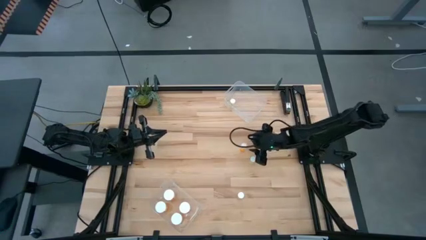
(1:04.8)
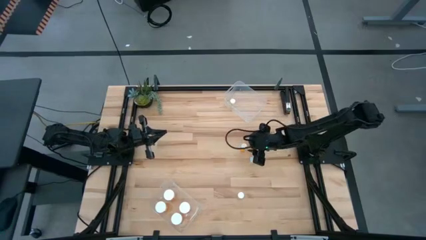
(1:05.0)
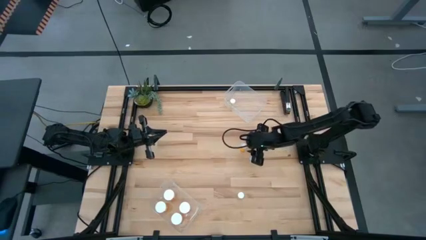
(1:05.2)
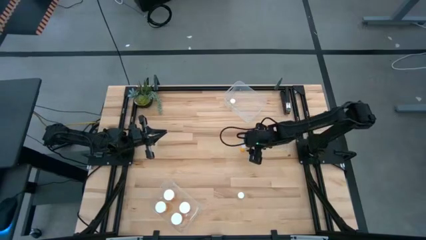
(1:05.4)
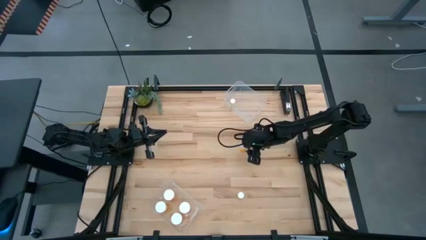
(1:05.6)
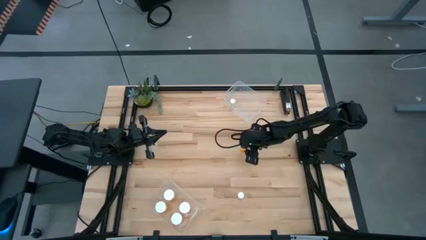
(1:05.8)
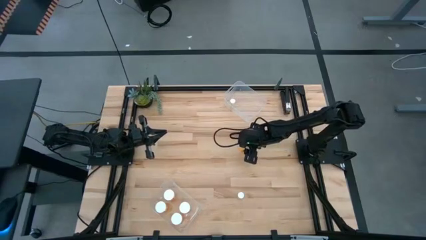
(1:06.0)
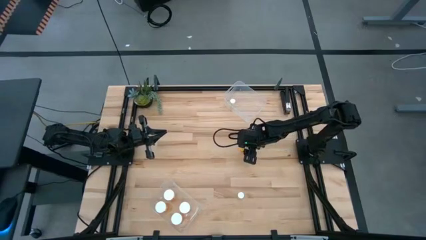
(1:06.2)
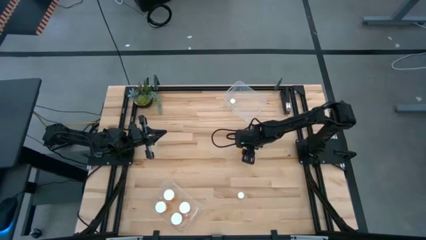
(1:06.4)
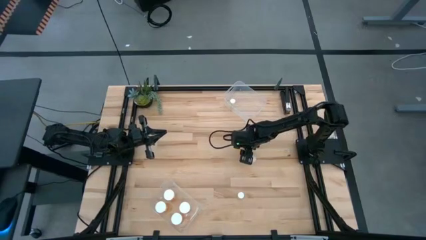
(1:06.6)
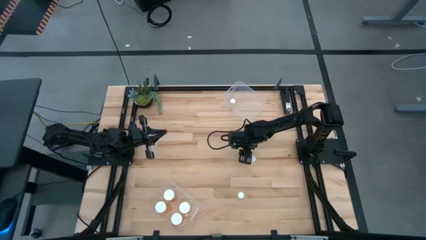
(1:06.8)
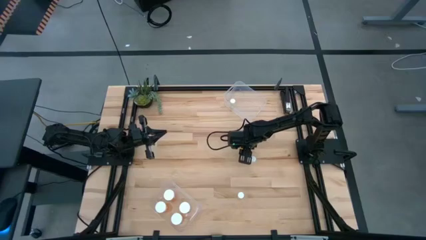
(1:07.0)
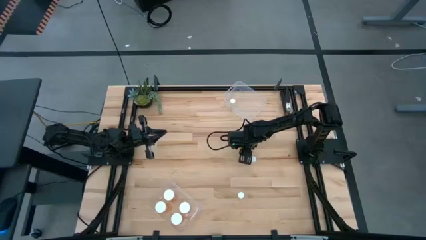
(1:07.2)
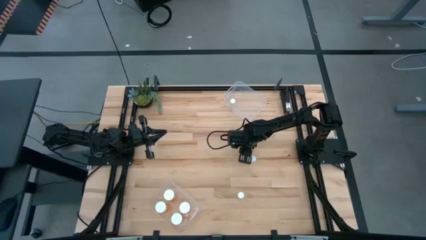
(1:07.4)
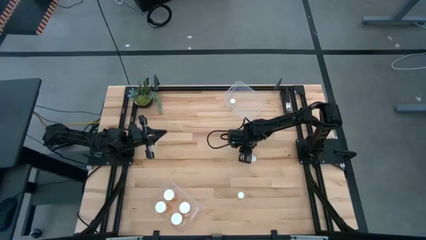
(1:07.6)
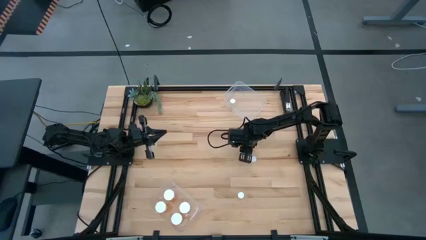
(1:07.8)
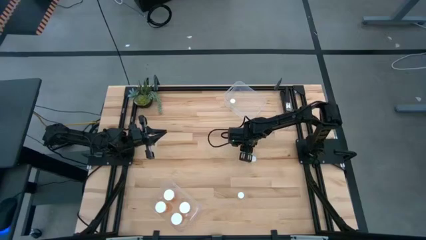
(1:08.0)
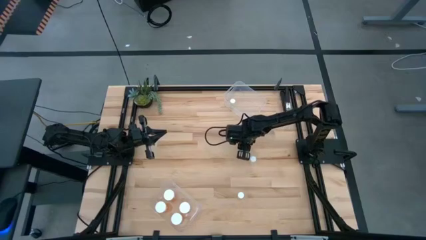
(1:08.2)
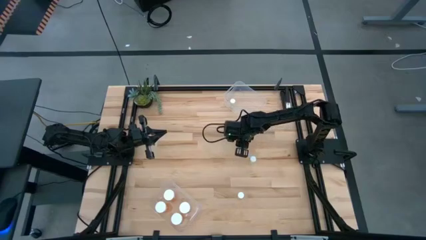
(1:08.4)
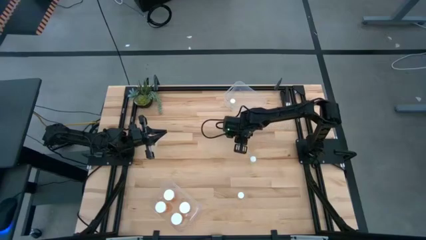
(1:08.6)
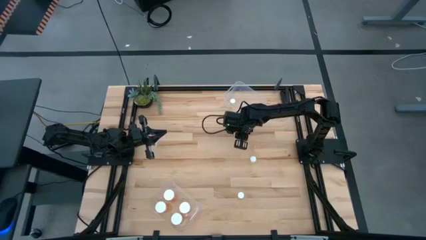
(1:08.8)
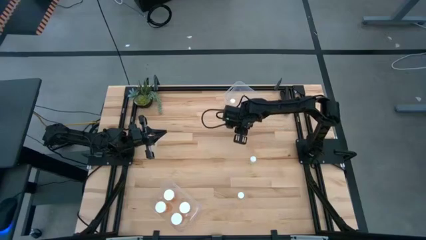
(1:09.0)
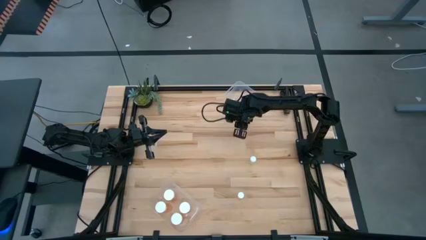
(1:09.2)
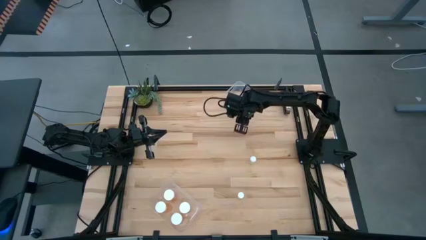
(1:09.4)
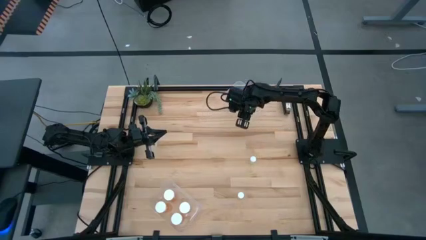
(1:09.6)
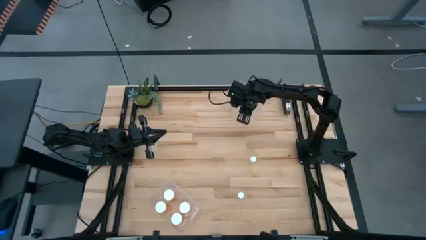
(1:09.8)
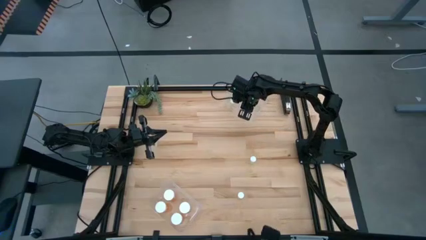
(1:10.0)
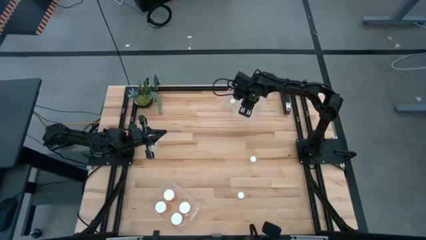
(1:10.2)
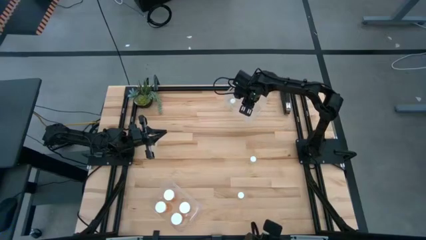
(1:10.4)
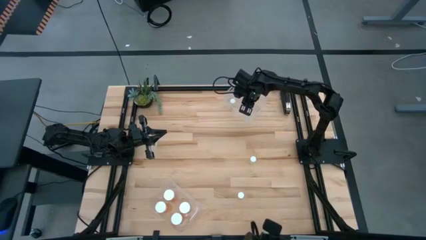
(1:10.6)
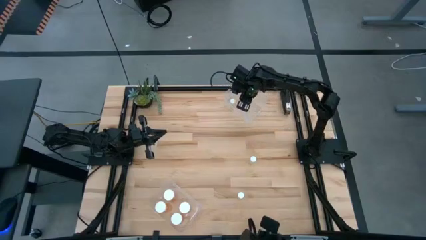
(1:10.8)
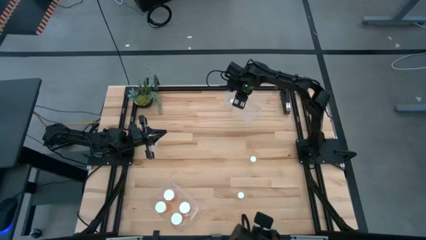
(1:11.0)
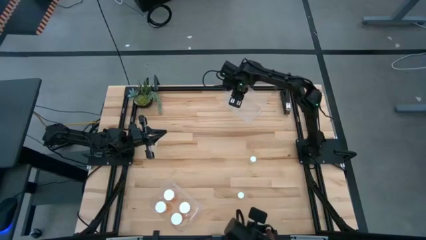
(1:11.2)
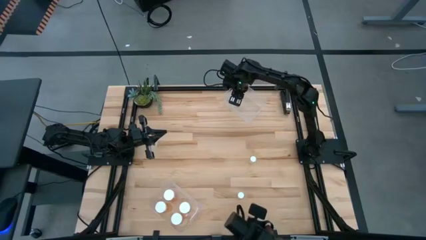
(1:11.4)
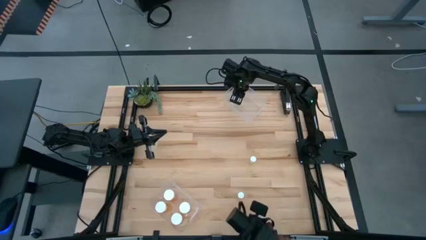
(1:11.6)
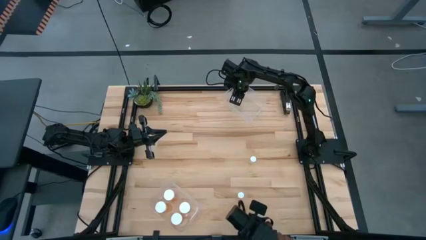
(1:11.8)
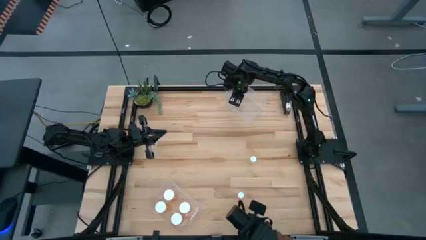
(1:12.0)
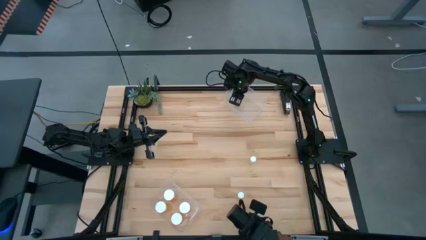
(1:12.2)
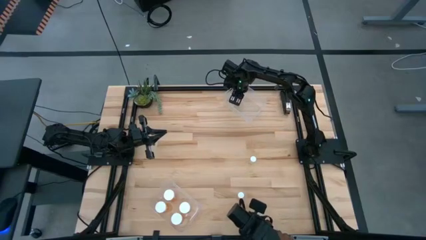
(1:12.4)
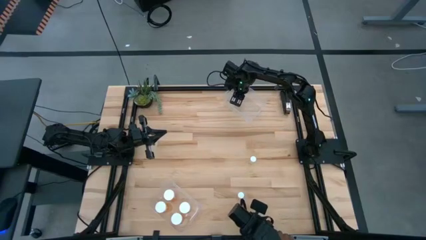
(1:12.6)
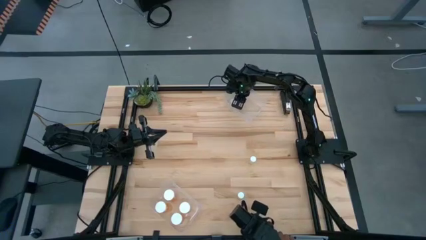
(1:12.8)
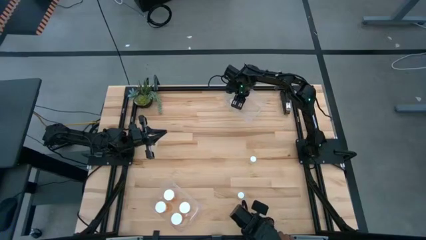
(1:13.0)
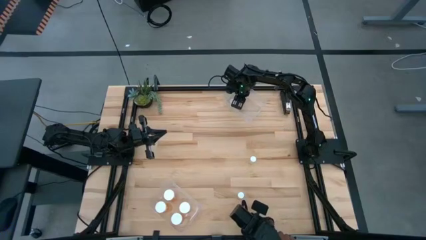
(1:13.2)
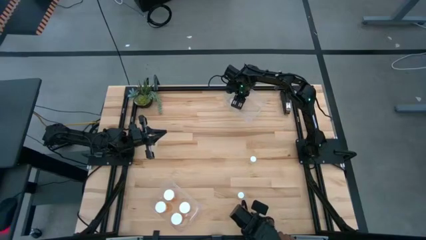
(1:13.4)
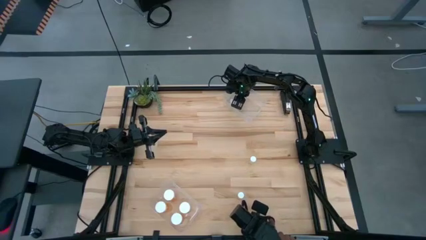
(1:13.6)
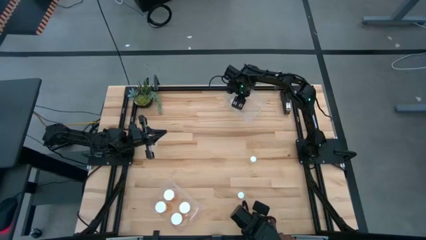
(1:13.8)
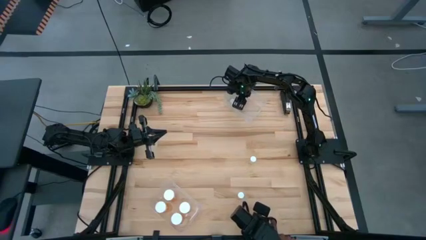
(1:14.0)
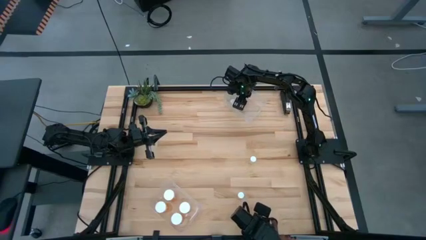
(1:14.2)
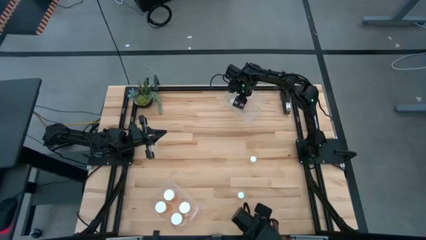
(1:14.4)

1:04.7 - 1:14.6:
Task: Pick and place medicine bottles into bin by pill shape (circle, oval)
Put the orange tablet bottle into the top transparent bin

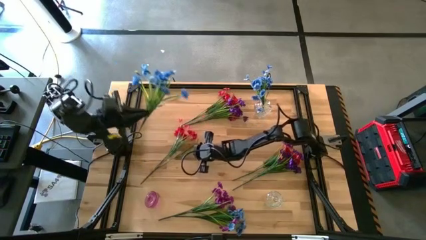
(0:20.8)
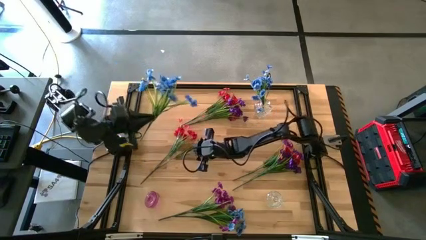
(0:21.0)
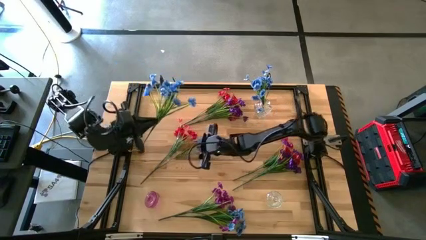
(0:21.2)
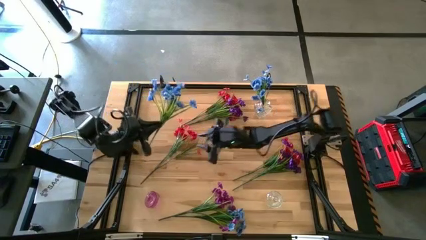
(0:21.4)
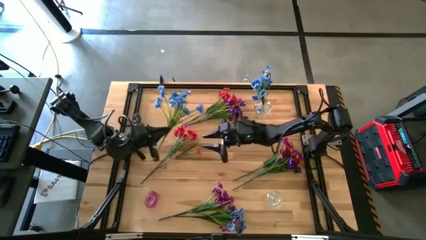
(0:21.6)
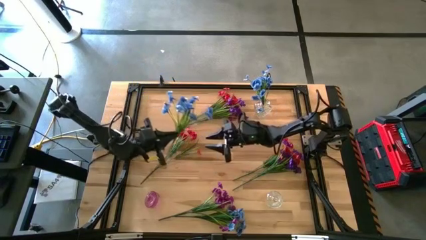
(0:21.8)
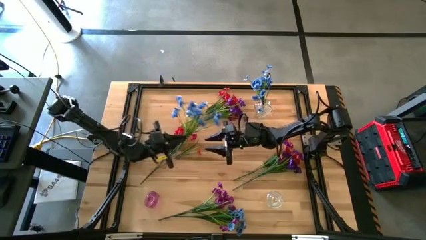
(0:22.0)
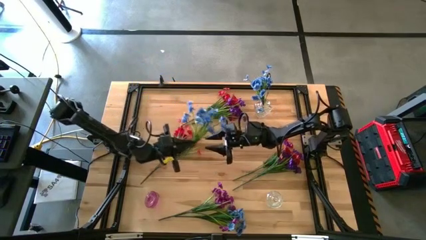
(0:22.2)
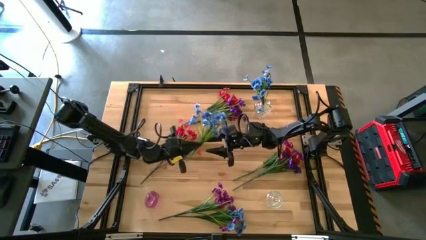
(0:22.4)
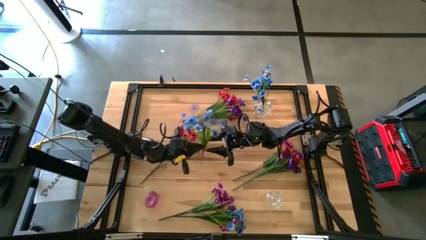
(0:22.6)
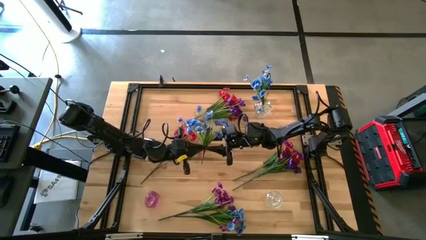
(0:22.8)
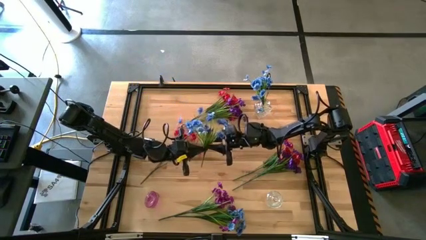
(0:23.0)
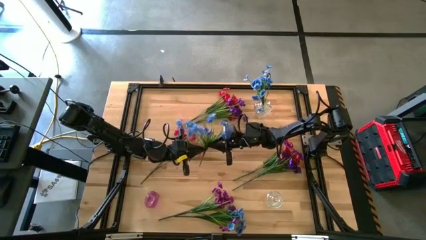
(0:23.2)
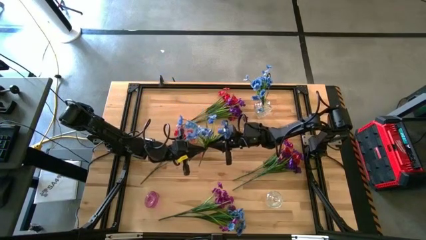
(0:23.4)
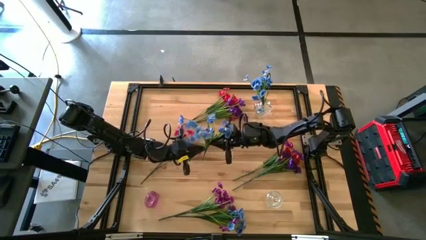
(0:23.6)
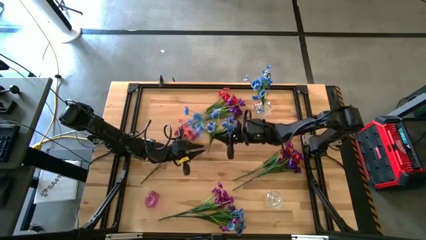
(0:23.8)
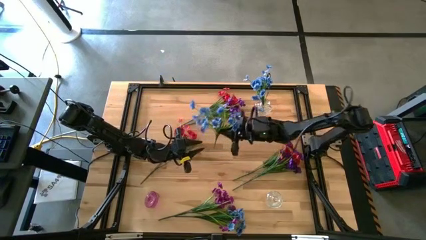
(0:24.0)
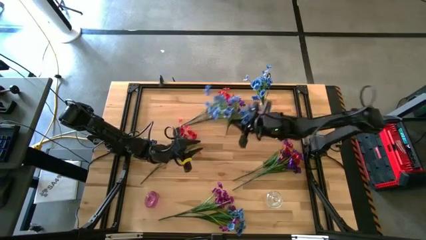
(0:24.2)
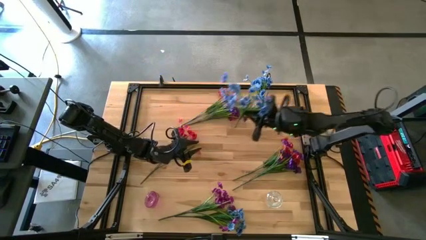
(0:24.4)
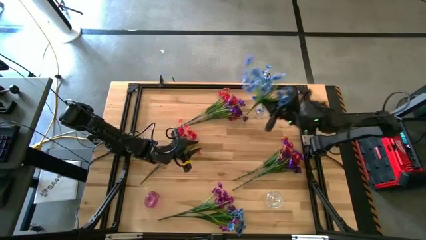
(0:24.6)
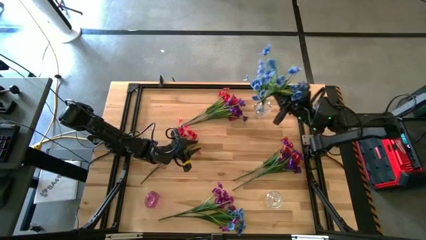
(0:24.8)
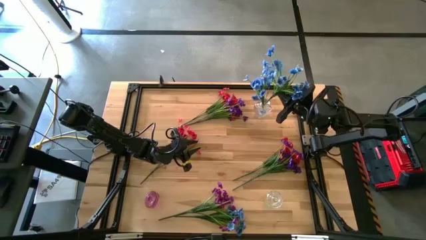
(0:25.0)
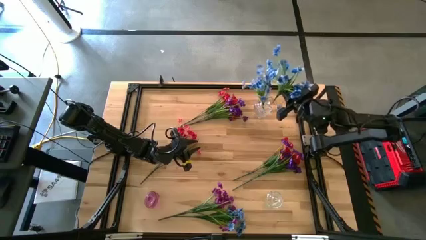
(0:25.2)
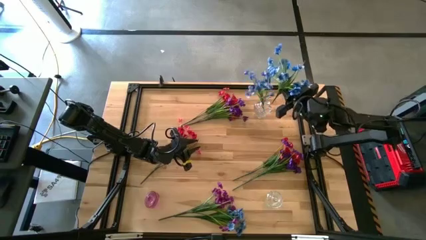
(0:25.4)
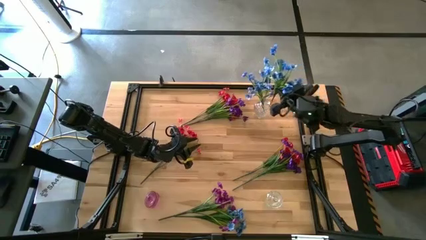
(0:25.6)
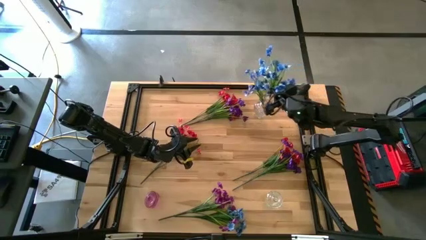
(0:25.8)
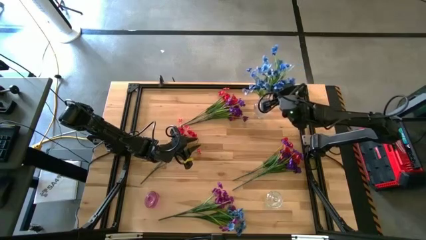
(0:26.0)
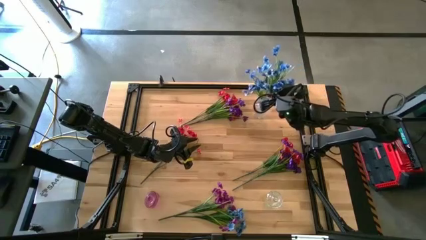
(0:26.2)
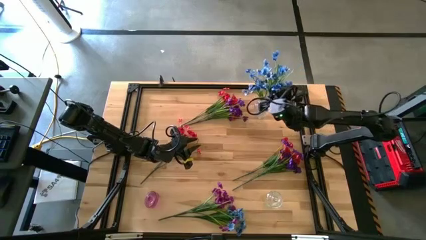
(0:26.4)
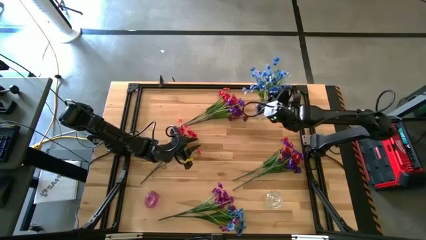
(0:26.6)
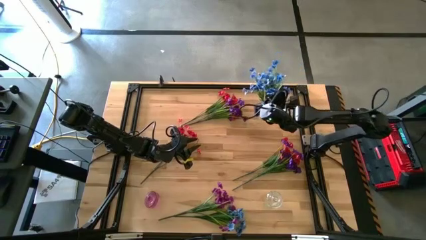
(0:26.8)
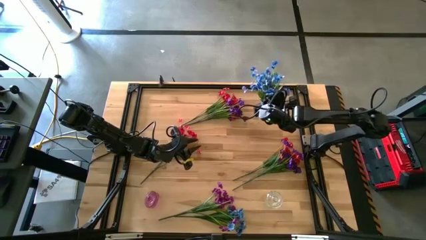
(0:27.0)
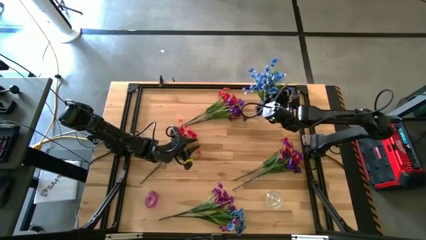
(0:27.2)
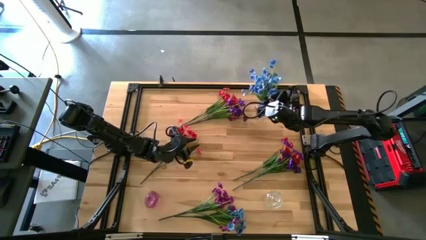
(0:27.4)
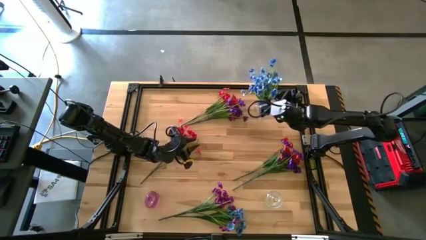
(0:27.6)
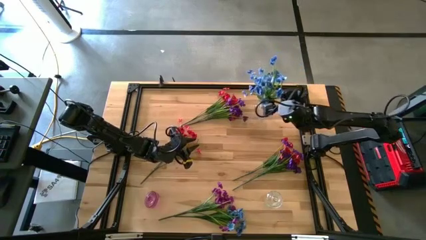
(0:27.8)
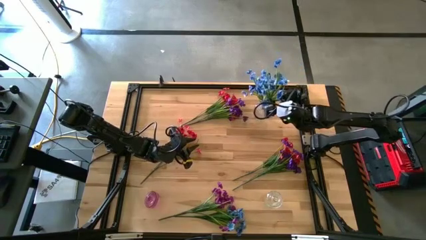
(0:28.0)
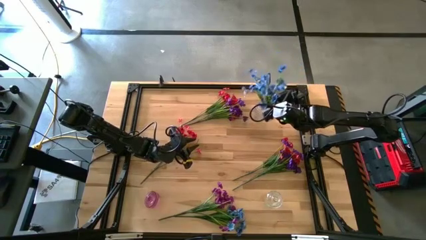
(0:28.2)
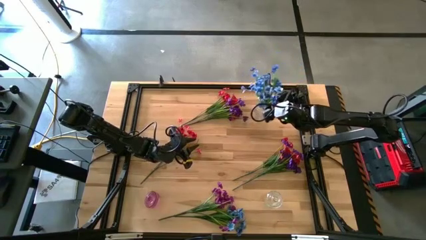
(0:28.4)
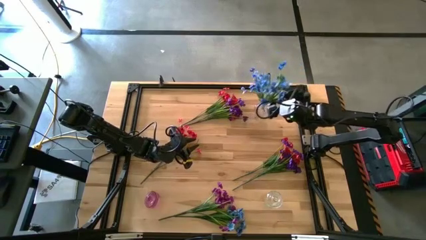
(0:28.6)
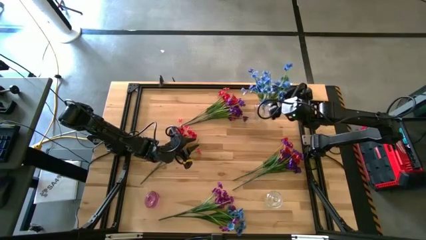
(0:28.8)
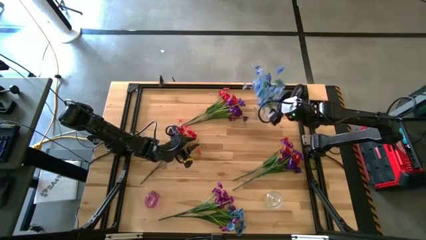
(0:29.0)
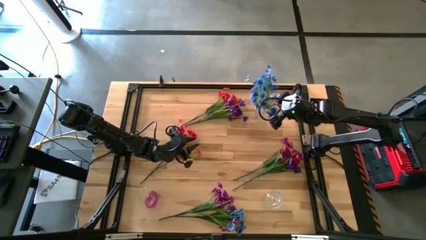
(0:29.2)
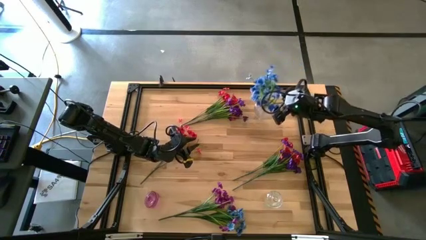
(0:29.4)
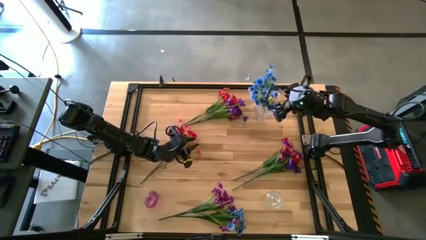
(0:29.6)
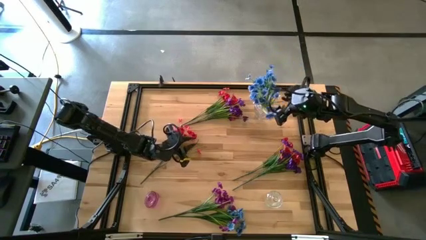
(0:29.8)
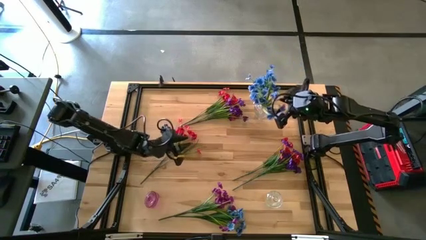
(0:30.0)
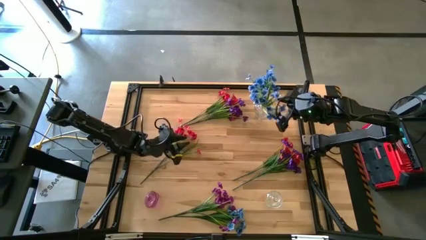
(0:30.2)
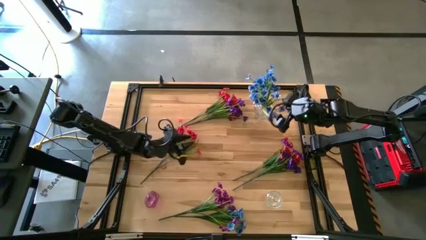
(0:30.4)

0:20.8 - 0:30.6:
Task: Sort flowers into vase by color
Put the top blue flower into the top transparent flower vase
